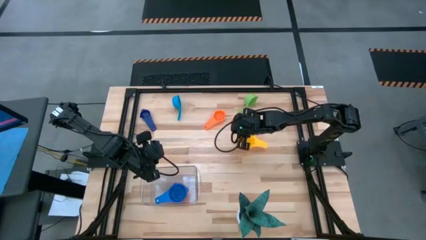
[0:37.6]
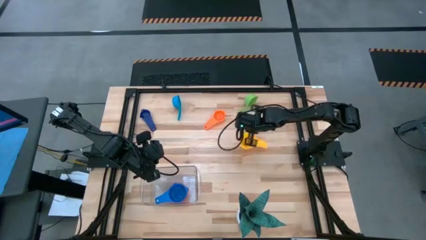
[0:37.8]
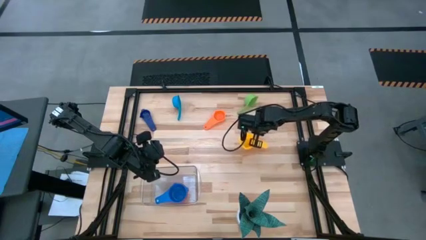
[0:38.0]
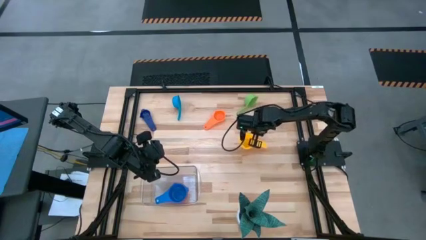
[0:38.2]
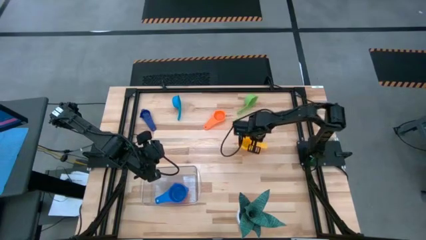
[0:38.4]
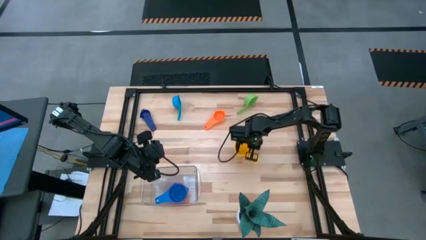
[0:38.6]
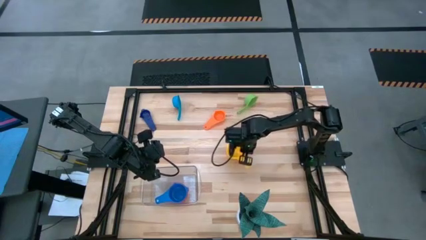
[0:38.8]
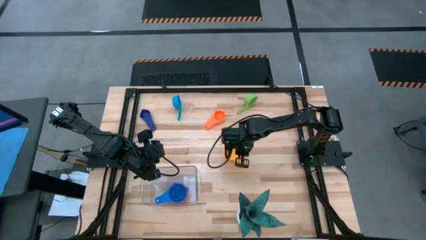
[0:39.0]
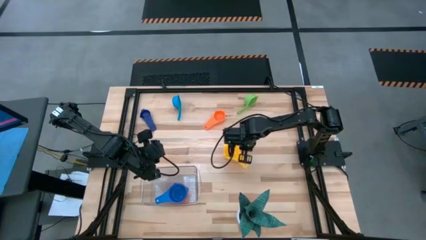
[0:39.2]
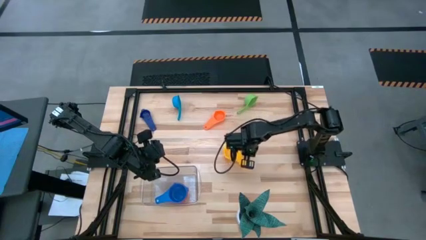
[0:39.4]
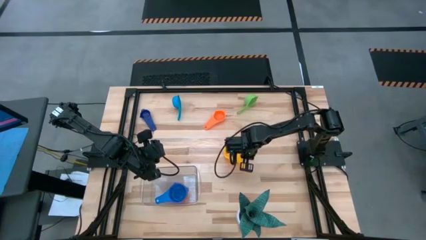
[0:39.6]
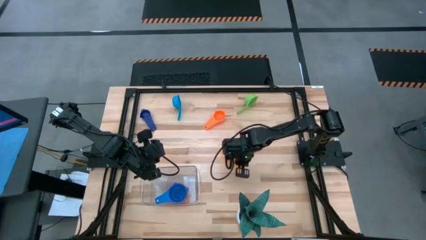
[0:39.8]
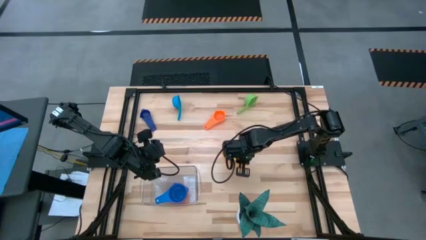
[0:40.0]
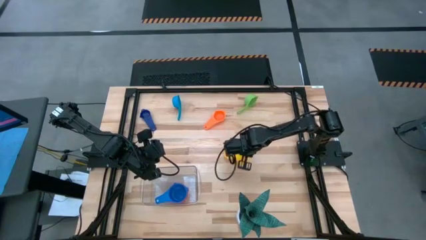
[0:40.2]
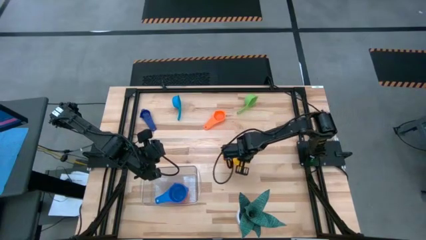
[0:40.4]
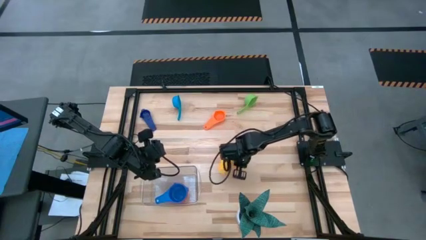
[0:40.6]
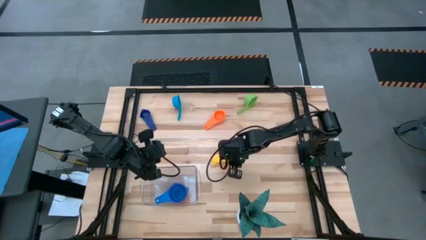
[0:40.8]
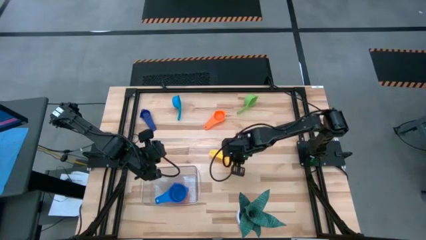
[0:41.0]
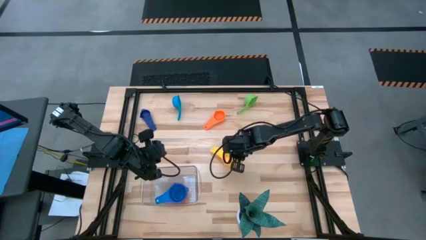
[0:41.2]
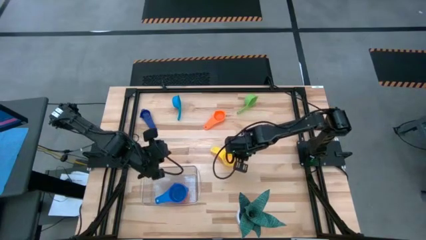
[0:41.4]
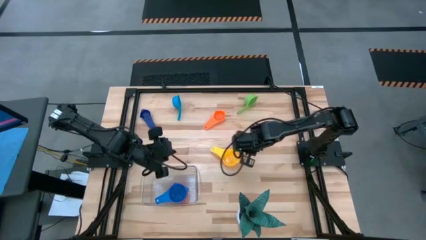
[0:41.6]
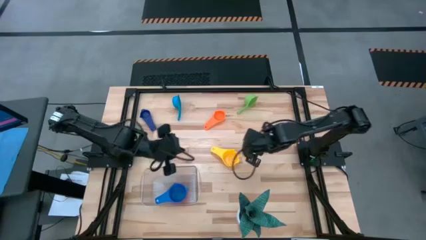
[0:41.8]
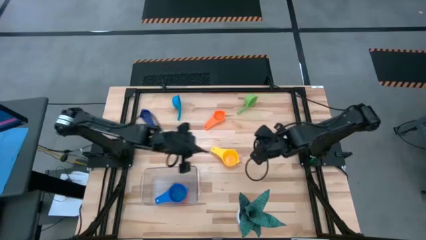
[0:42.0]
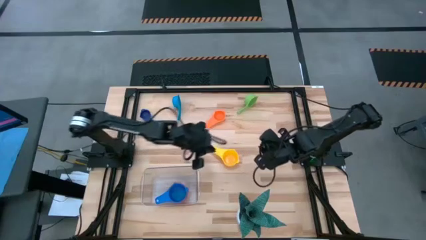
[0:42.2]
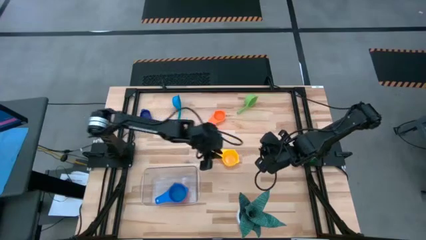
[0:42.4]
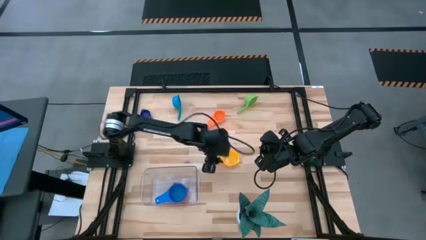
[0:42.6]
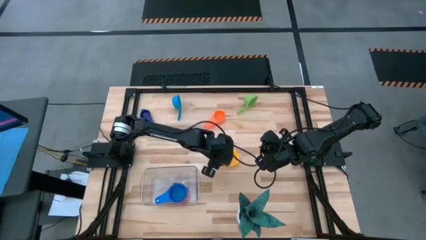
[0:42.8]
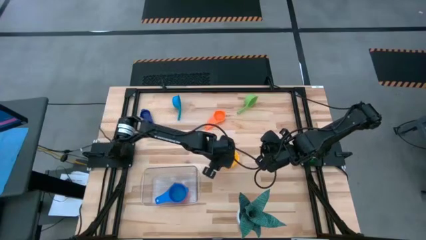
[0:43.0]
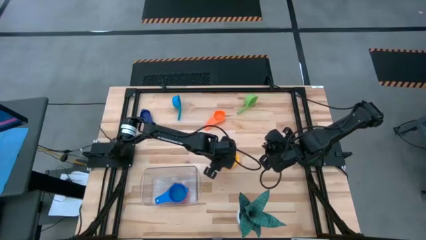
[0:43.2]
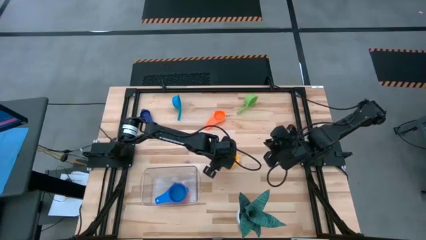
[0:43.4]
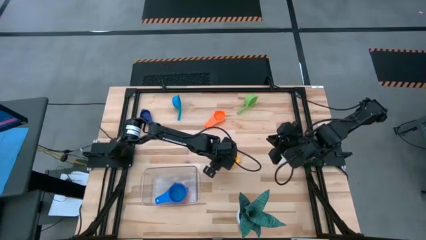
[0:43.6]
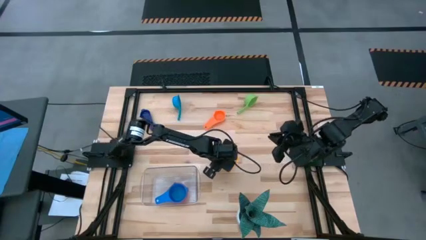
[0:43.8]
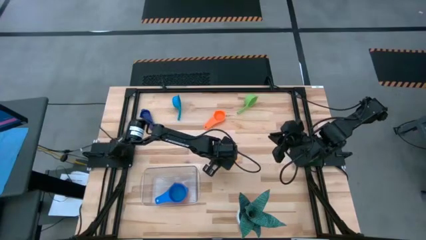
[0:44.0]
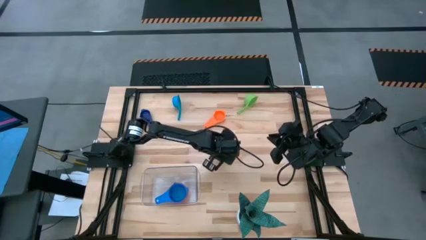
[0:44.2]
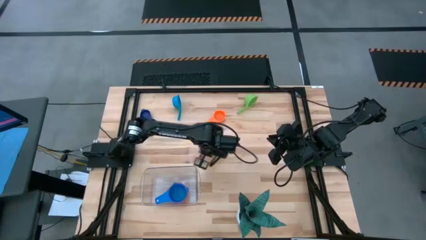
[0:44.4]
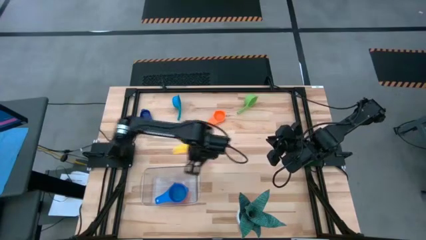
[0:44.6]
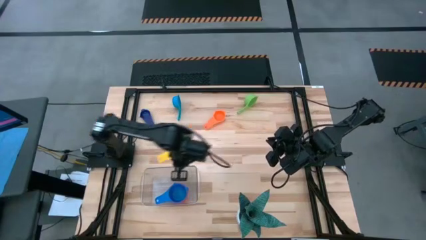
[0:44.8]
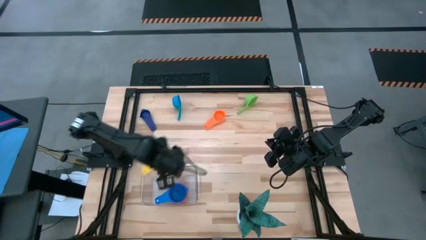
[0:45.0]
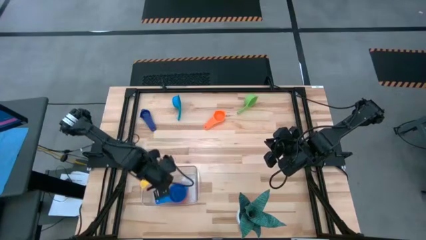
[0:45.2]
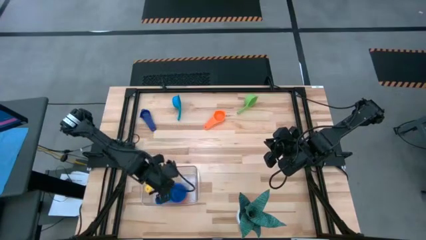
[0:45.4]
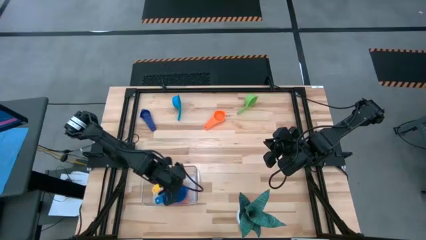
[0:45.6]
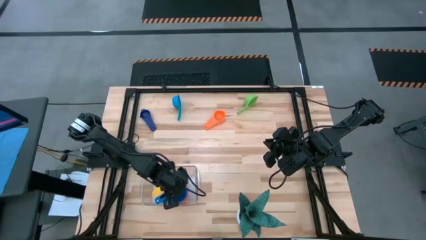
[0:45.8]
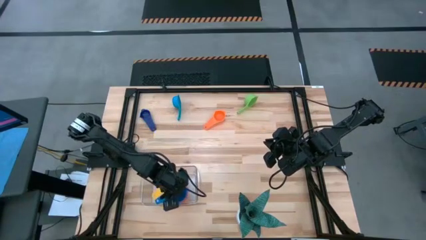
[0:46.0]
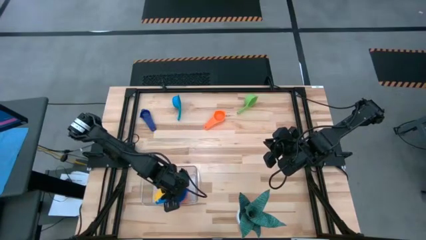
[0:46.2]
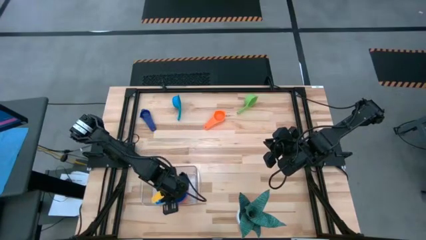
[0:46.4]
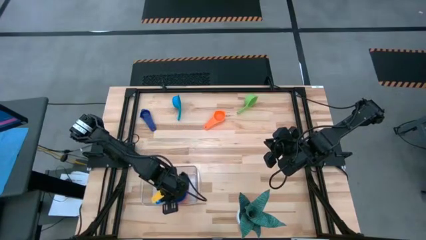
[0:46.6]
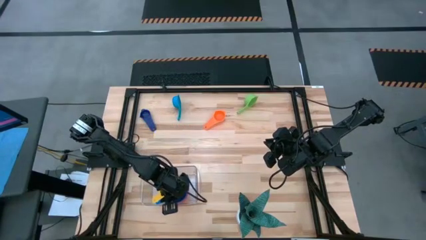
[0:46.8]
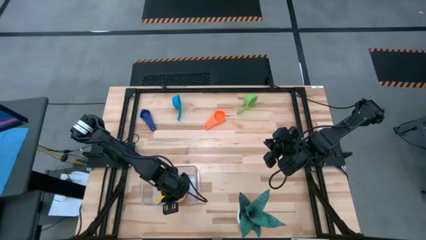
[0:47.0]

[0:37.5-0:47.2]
Task: Nest measuring cups in basket
Stack the yellow measuring cup on top of the blue measuring cup in the transparent bin

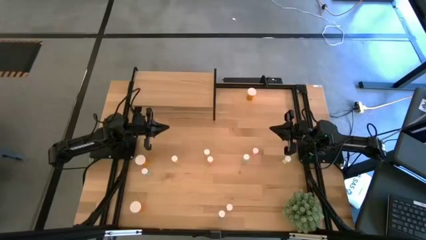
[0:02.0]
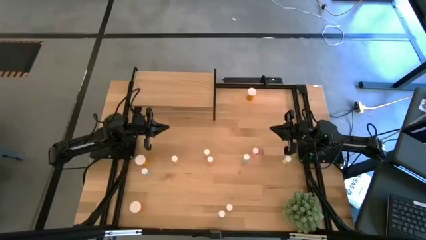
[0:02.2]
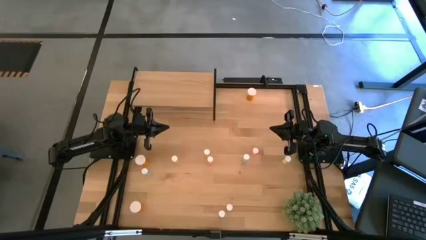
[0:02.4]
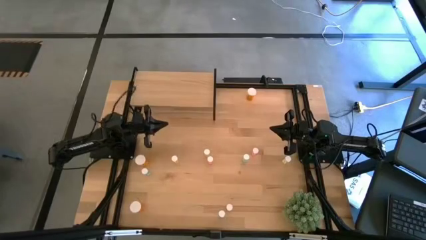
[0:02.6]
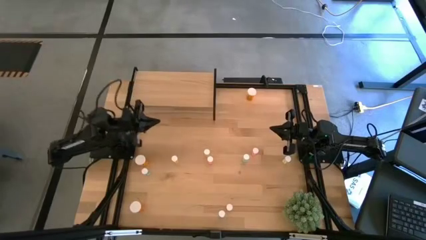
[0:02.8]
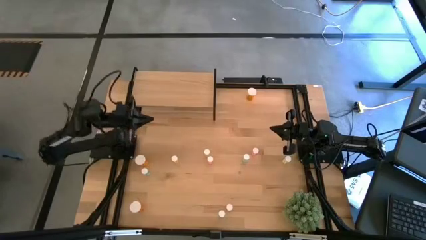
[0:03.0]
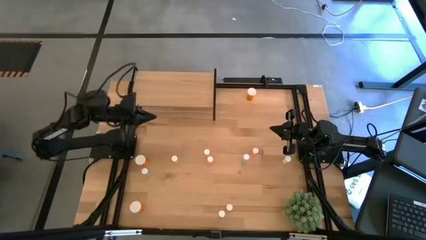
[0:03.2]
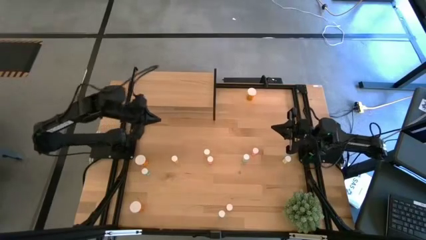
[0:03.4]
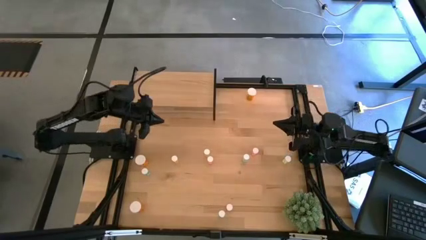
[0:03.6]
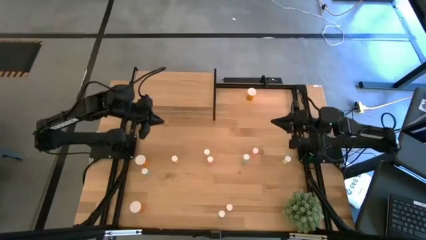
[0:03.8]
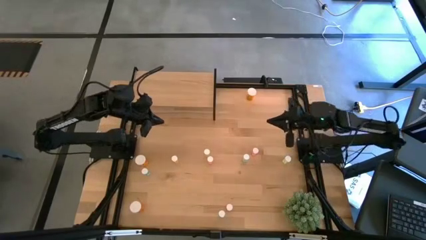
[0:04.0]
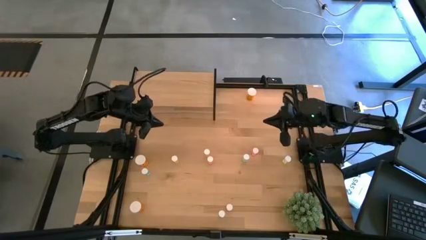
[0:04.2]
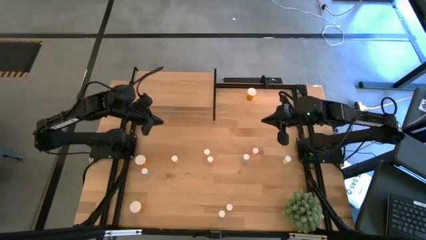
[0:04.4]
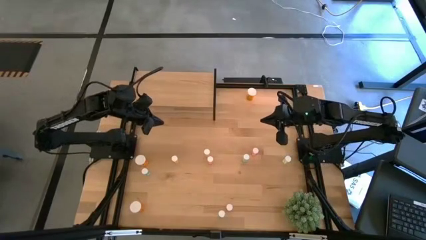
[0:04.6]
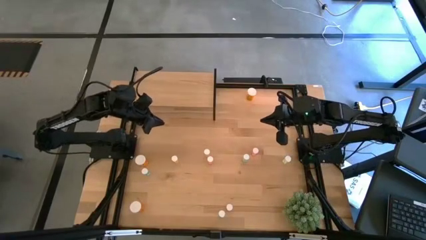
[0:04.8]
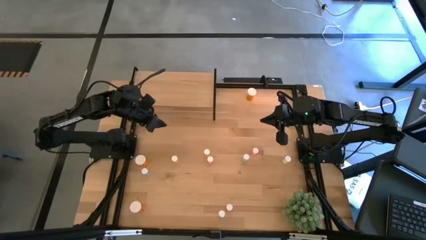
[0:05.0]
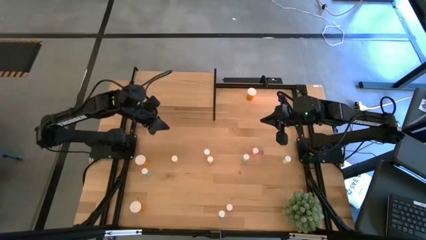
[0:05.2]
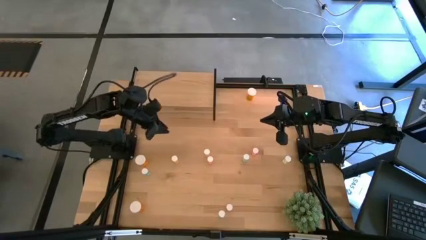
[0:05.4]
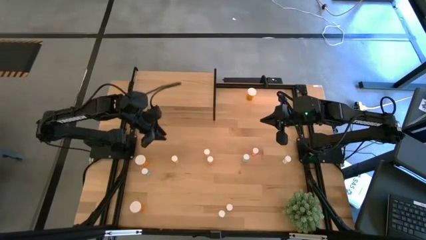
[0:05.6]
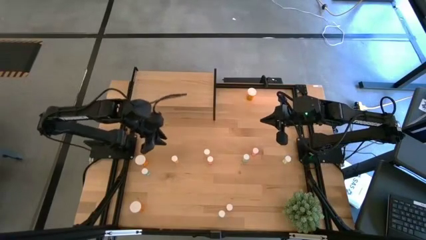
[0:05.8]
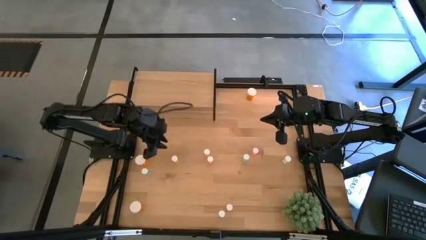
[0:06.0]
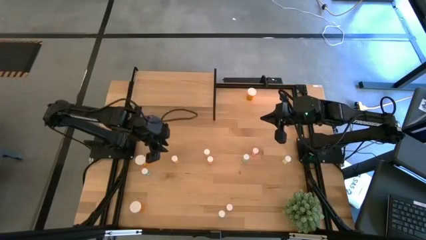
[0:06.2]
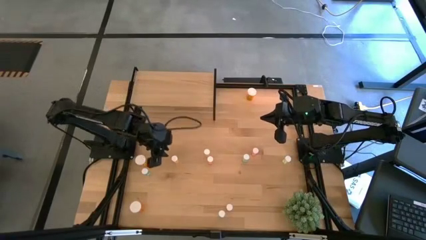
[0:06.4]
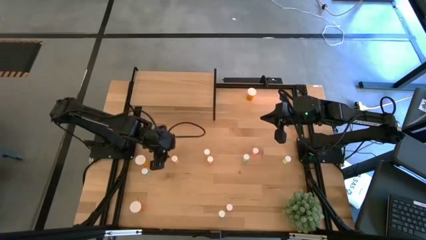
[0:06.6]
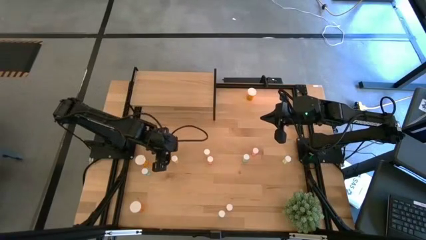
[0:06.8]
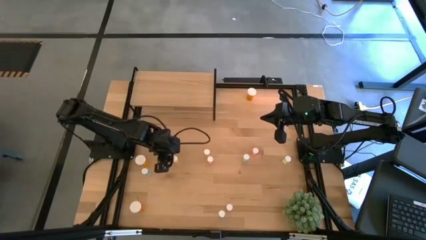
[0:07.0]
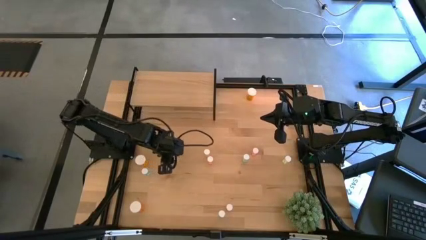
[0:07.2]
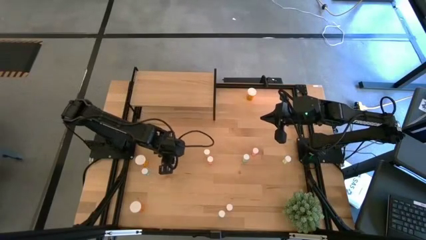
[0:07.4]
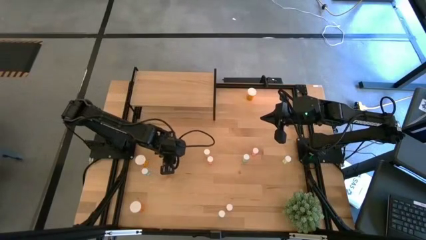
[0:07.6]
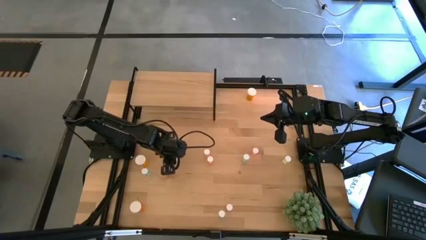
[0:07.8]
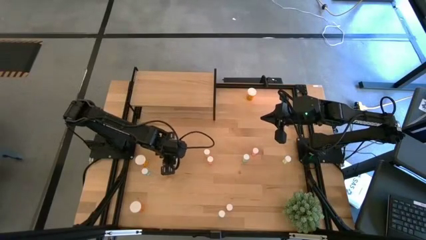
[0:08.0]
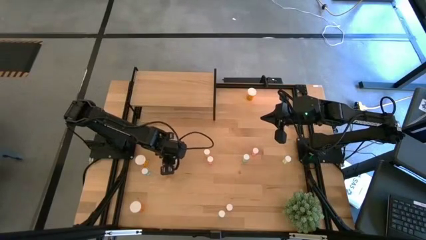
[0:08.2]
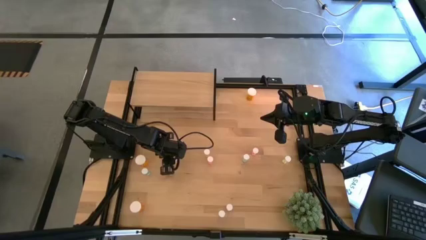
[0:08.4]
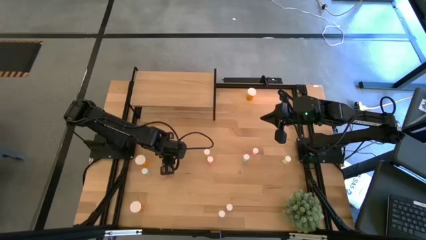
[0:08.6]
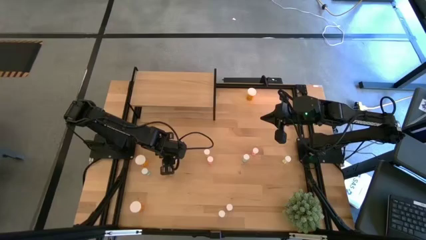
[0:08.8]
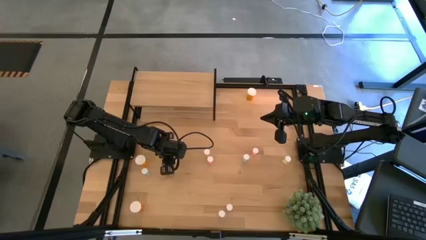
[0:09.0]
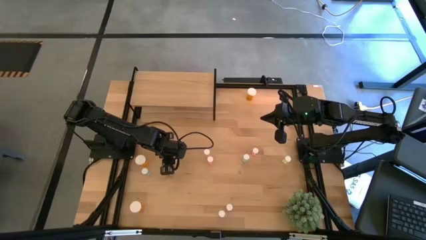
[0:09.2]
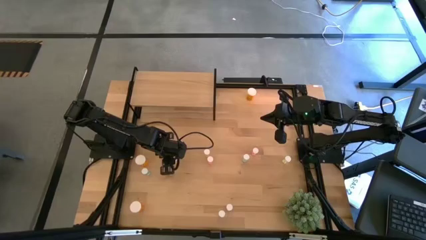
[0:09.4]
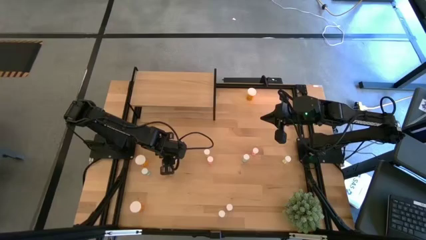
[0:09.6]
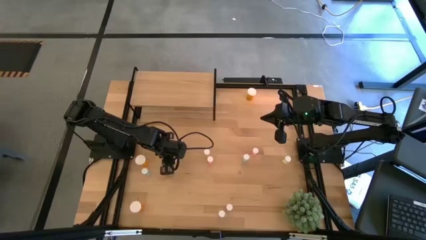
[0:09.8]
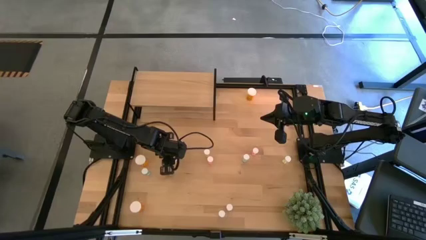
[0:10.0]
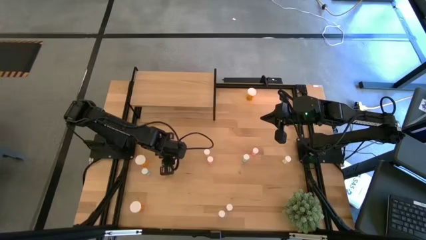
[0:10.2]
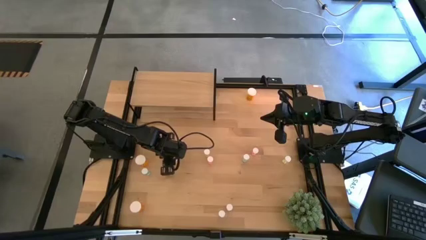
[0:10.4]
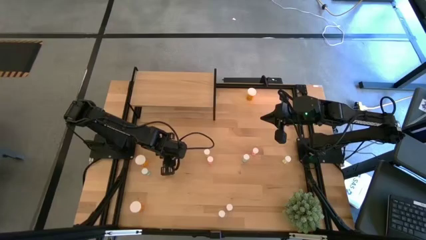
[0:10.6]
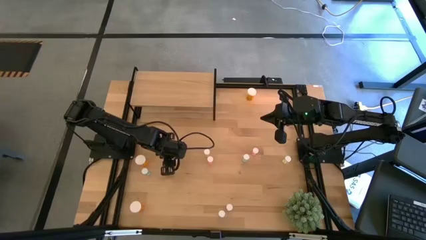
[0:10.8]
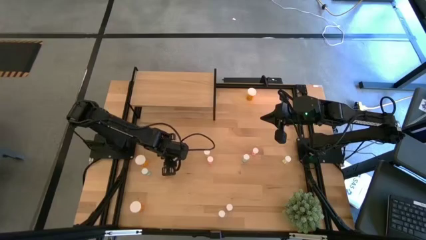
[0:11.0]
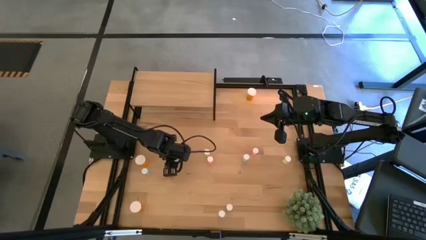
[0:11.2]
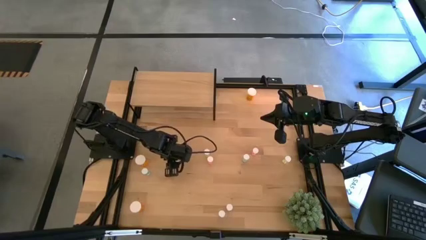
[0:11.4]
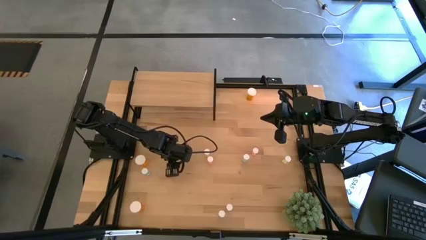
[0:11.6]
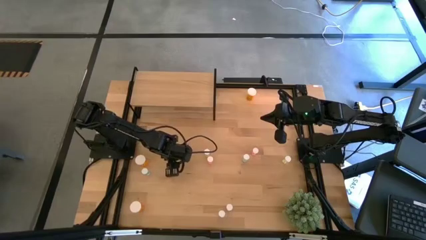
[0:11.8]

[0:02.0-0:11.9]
Task: Pick and place medicine bottles onto shelf by color
Put the left small yellow pill on the shelf
